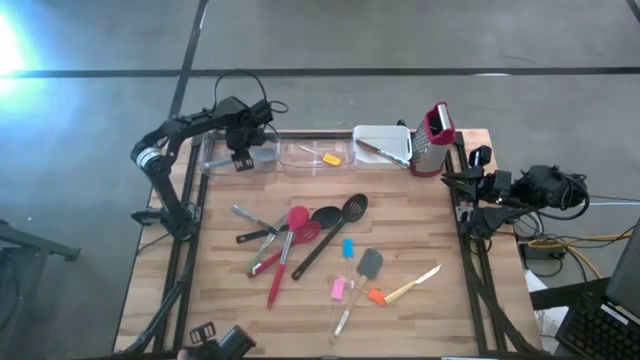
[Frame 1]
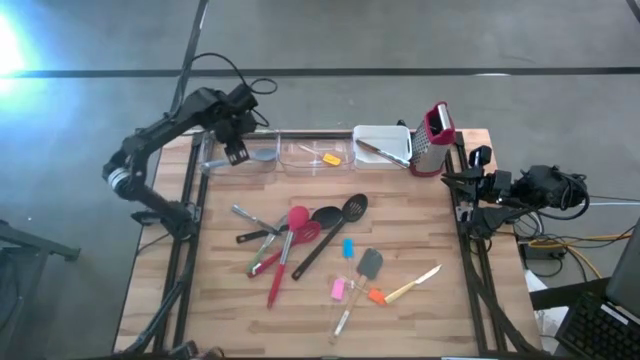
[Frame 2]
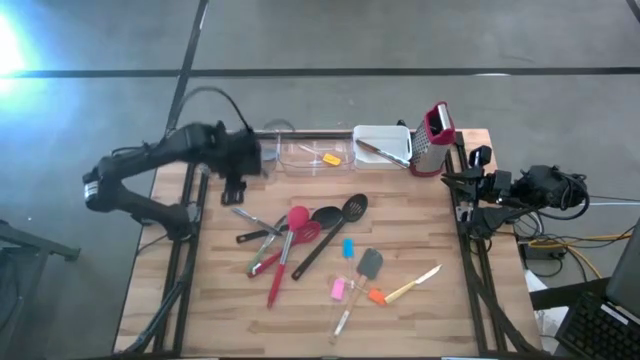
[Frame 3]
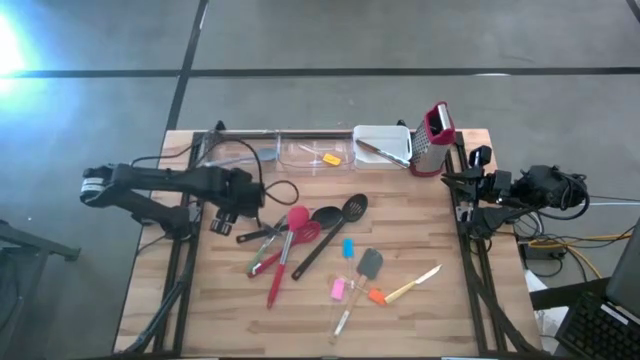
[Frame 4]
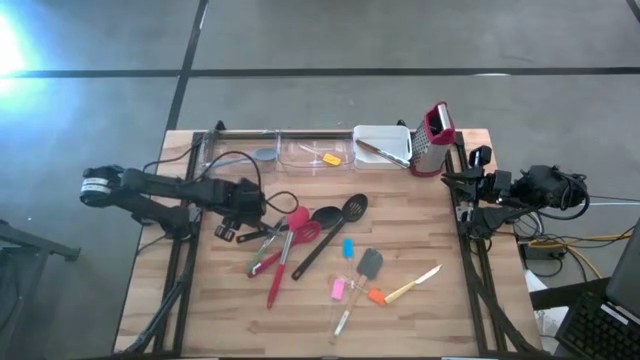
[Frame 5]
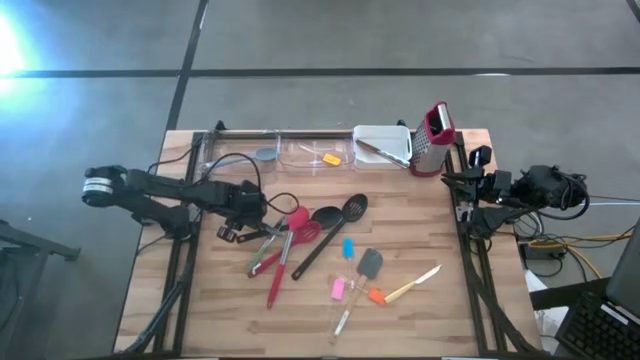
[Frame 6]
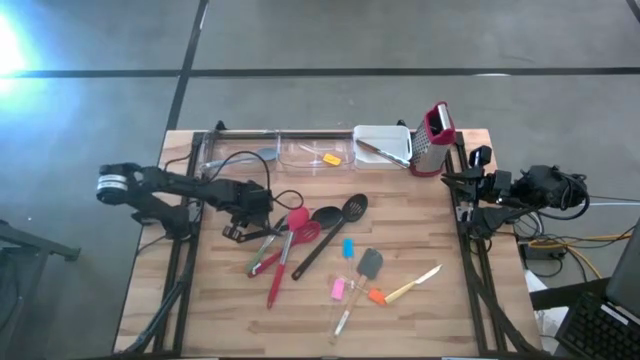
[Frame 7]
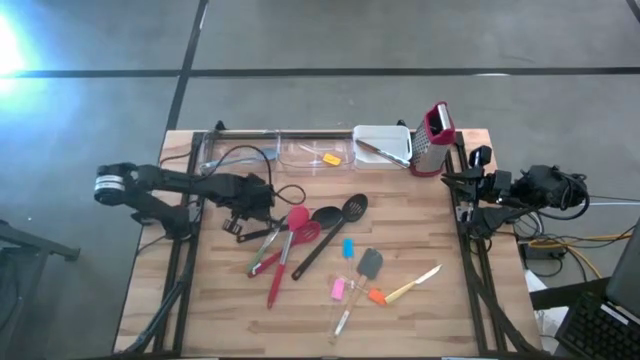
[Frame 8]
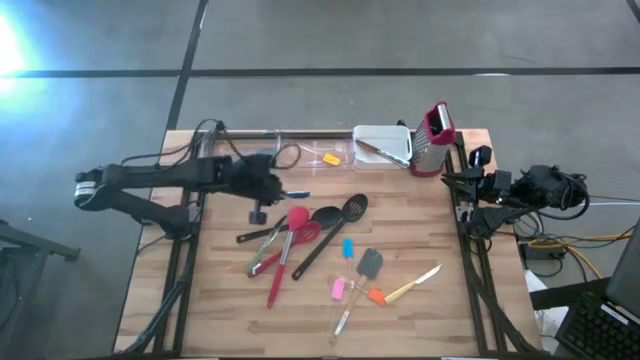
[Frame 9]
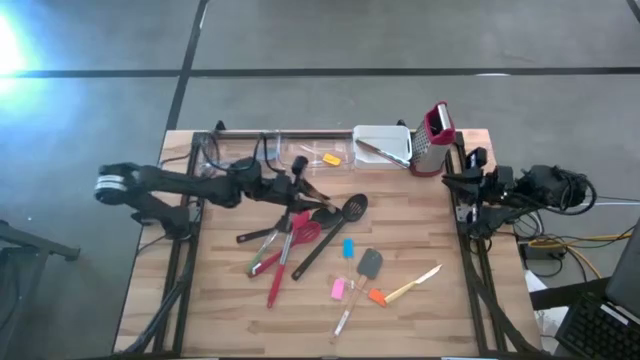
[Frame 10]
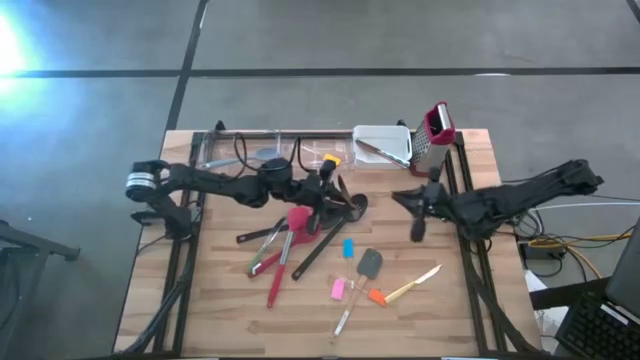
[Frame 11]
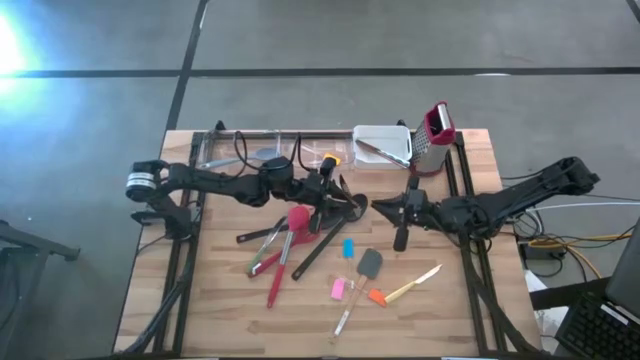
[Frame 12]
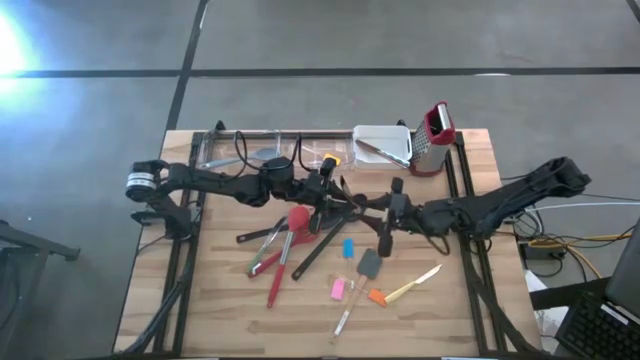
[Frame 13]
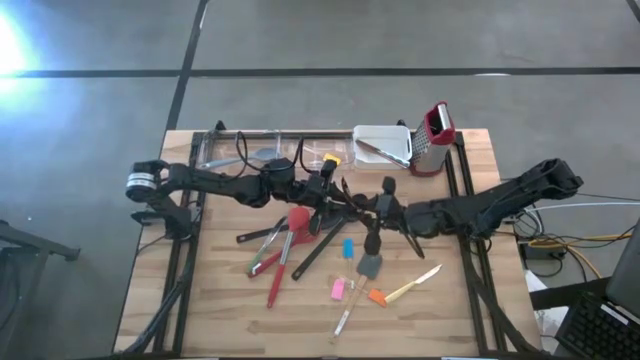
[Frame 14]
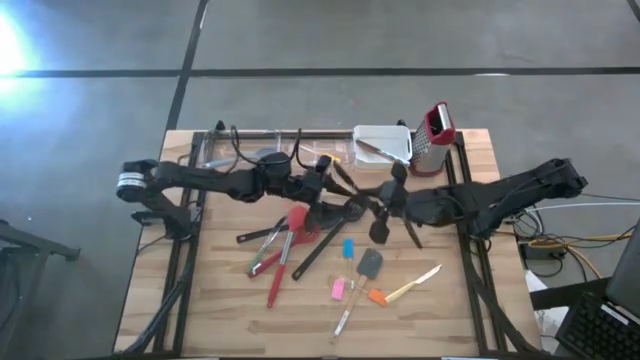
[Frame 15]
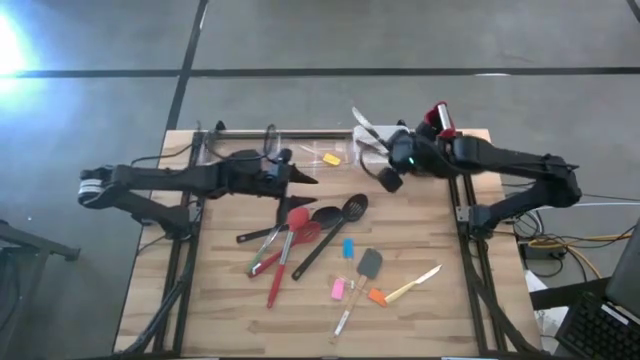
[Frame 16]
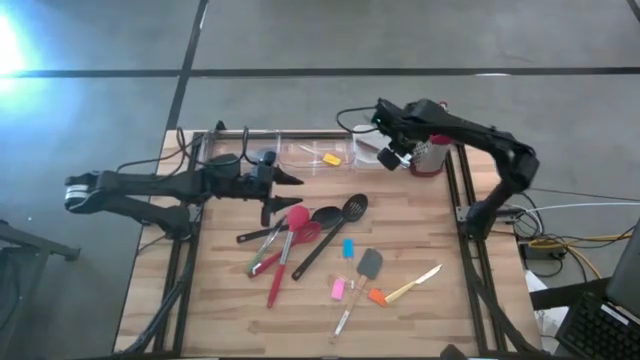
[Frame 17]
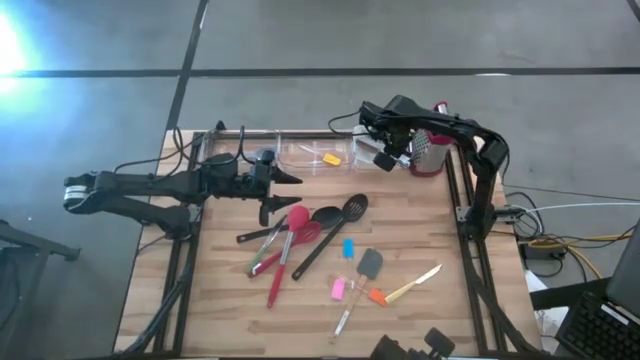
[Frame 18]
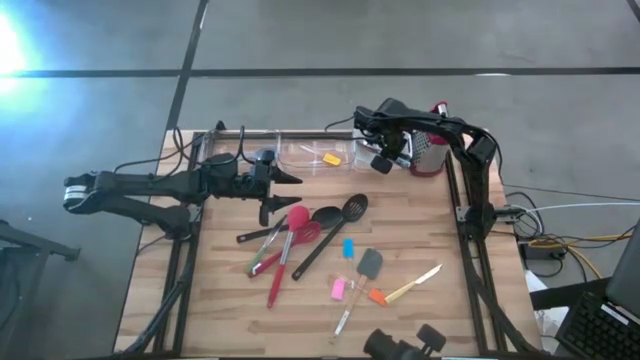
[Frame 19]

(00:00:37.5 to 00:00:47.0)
Task: Pick & Place Kitchen Items
Put the silver table knife into the white bin

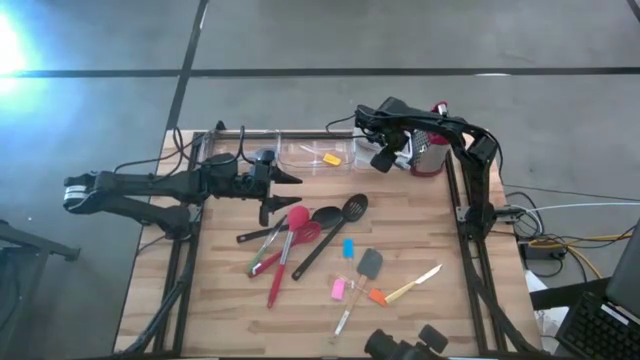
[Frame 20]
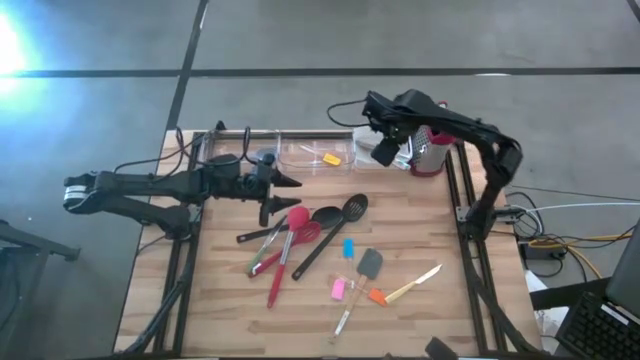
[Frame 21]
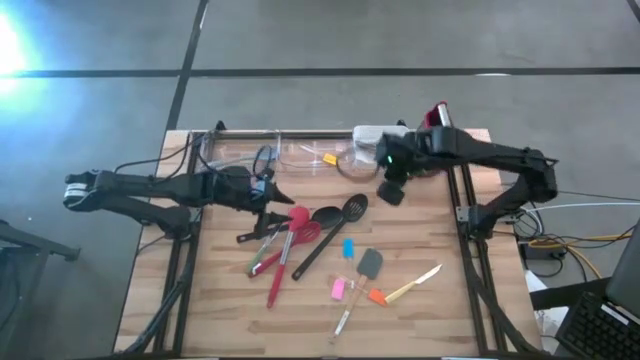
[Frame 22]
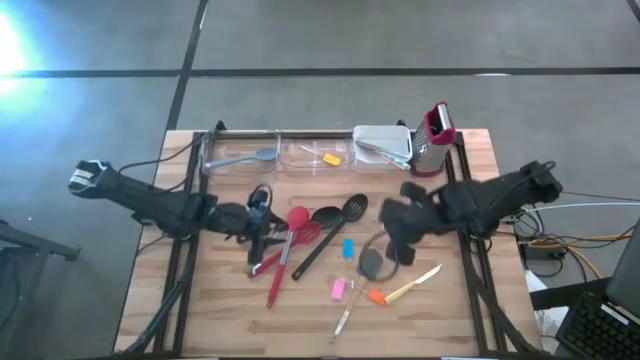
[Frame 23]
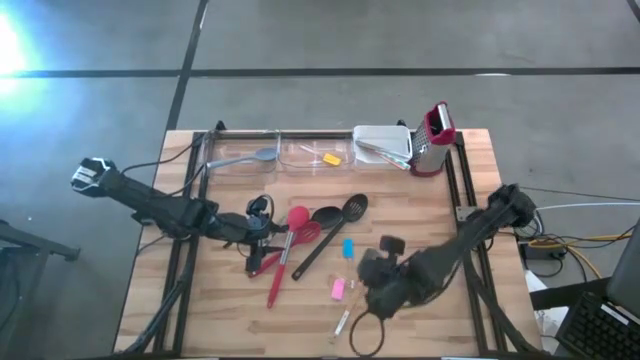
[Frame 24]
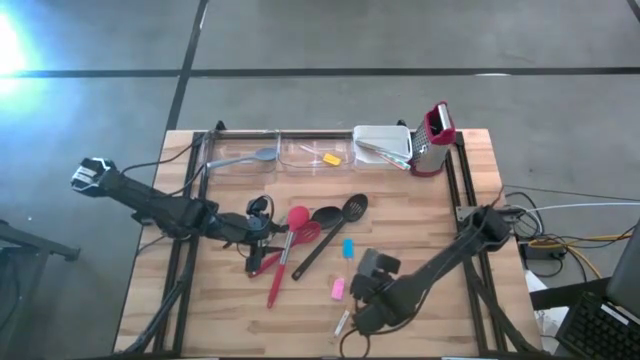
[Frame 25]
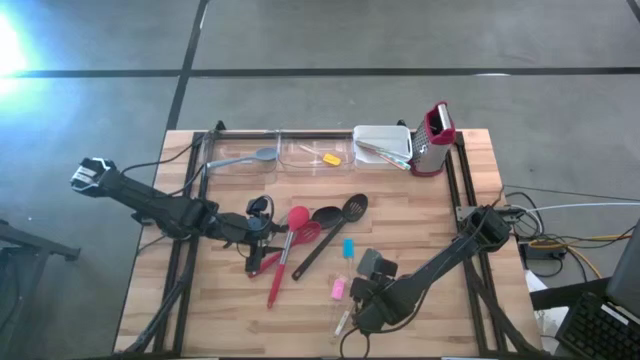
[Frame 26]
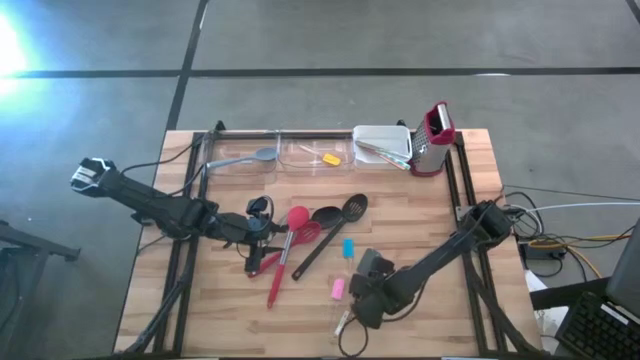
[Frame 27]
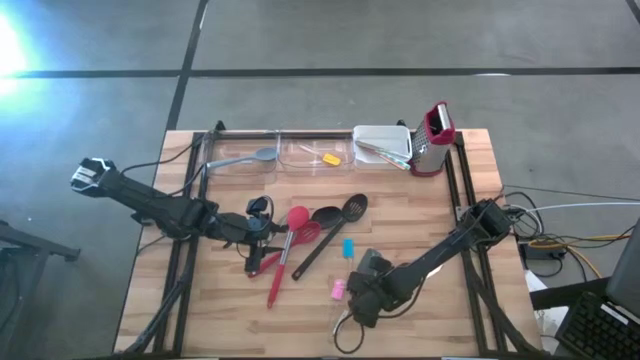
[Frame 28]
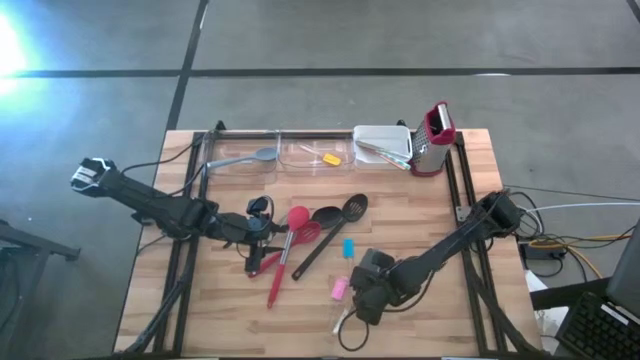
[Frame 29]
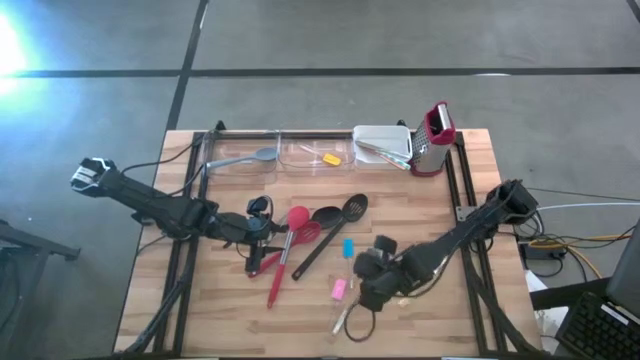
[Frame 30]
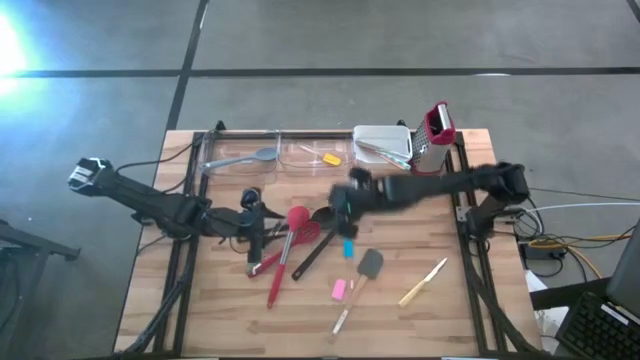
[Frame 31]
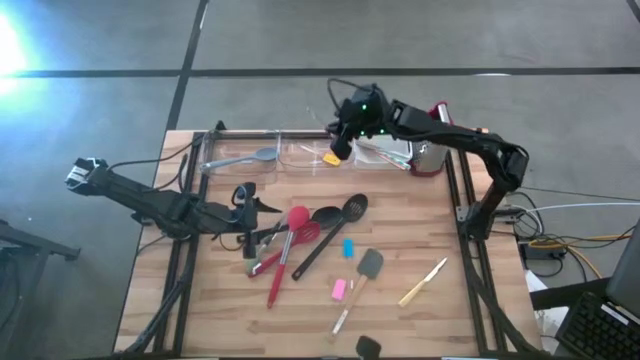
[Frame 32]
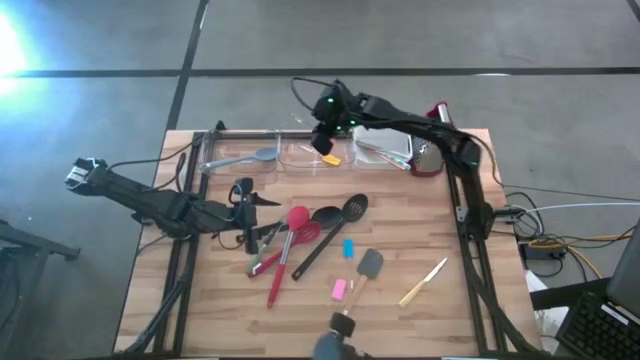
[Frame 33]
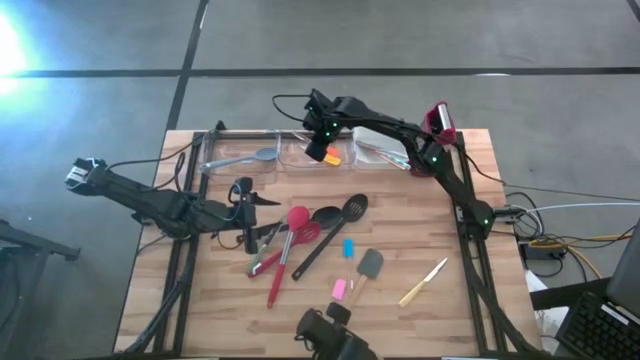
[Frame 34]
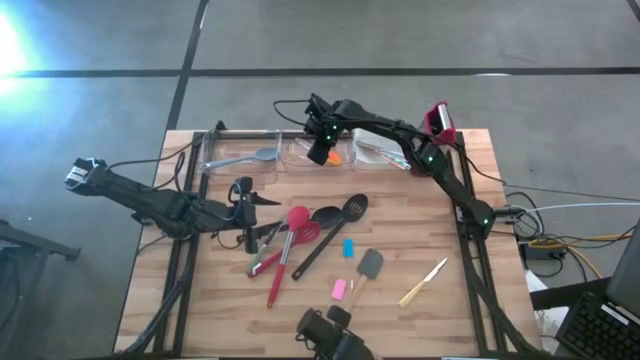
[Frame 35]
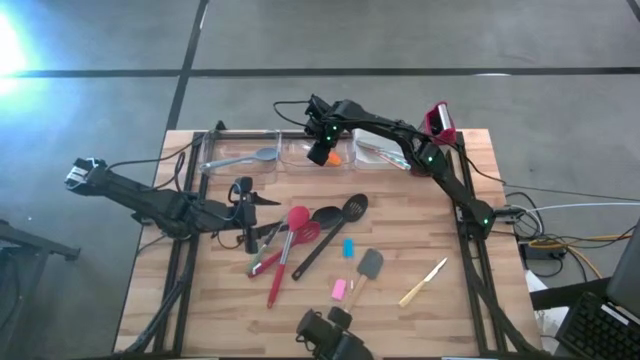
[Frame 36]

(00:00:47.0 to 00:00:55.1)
Put the orange spatula into the right transparent bin

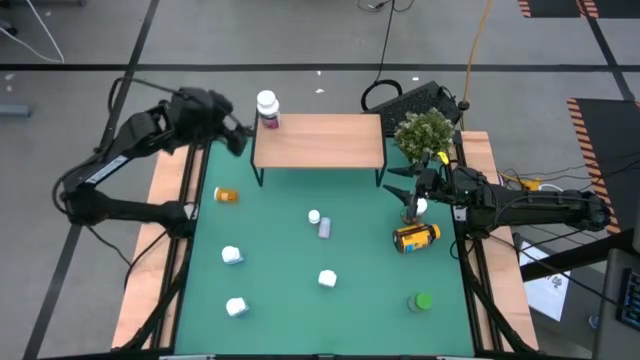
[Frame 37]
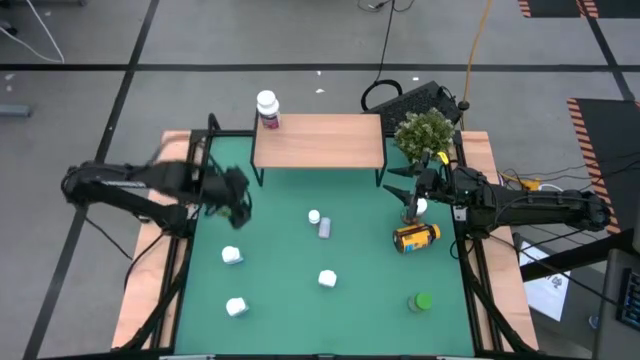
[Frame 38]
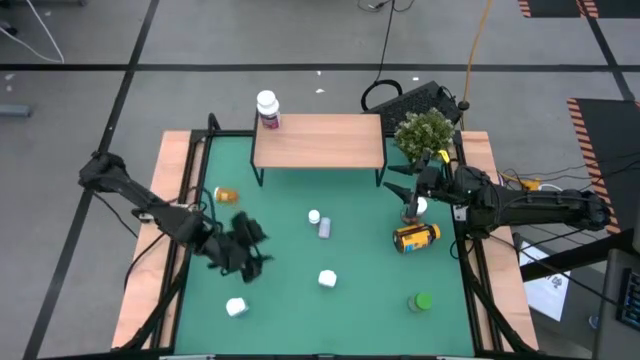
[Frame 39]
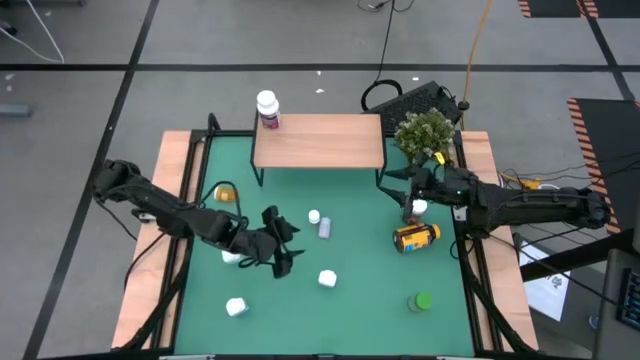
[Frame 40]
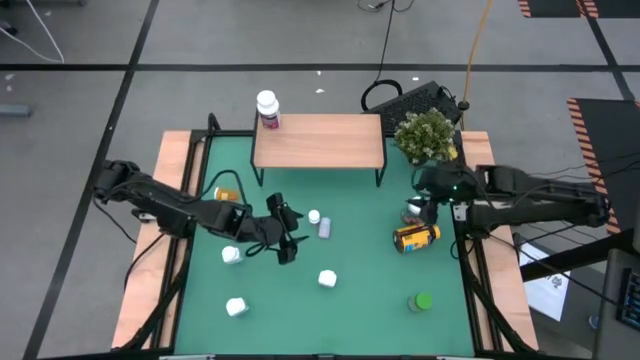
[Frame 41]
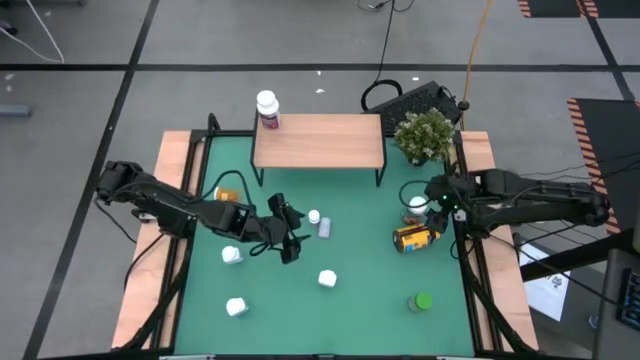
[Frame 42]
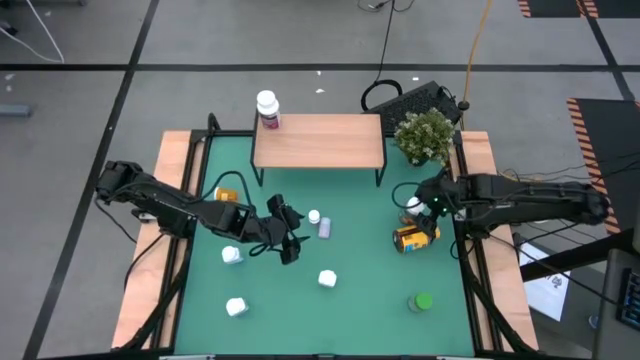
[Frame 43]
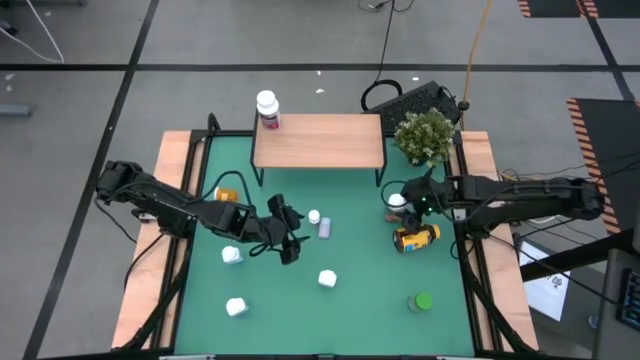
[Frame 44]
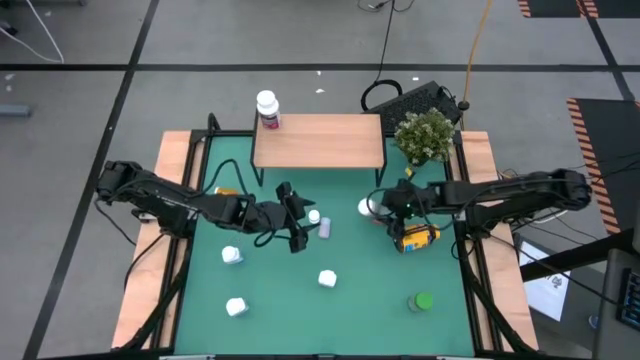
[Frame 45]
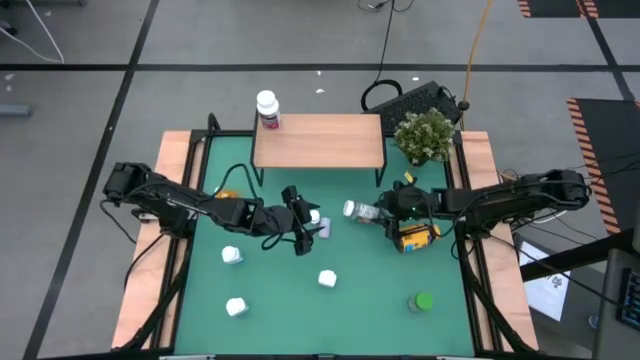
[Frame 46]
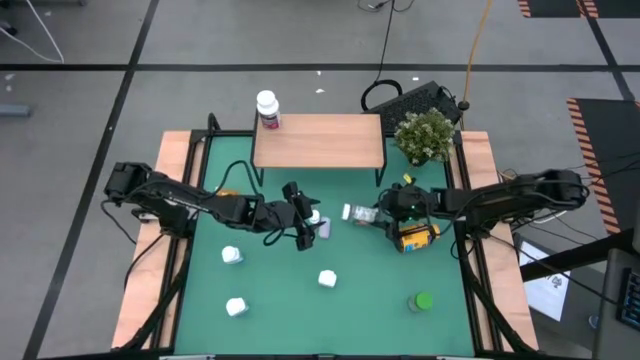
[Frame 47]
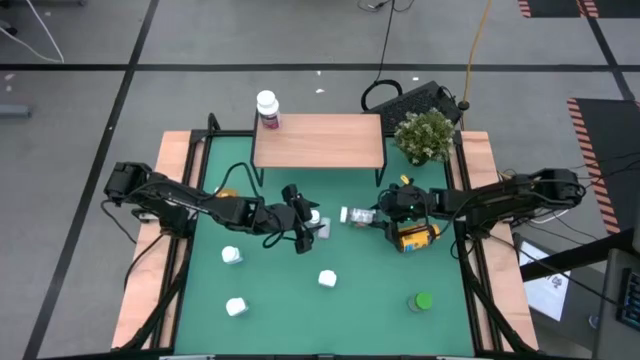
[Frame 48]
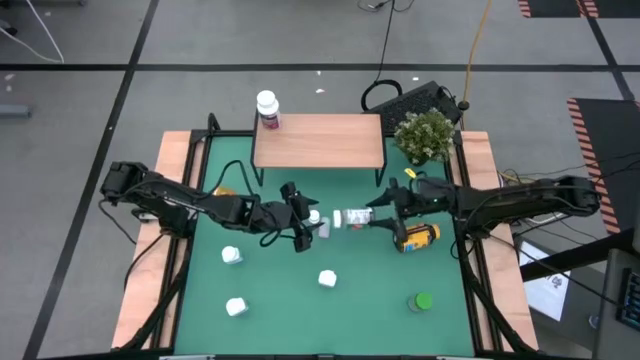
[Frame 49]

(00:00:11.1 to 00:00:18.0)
Task: Pick and place medicine bottles onto shelf by color
Put the white and green pill bottle on the shelf
